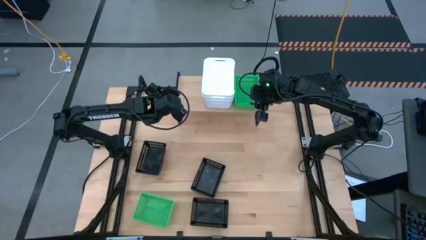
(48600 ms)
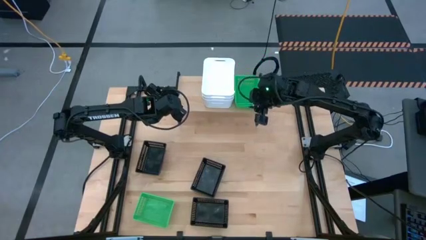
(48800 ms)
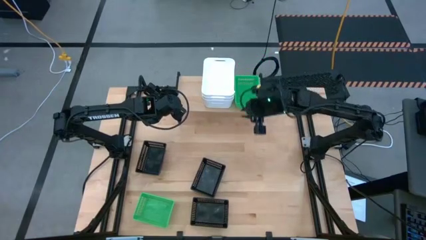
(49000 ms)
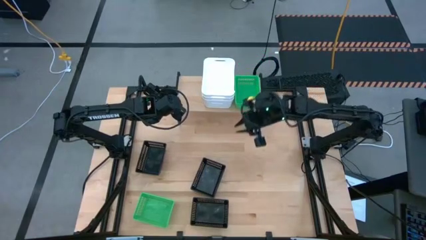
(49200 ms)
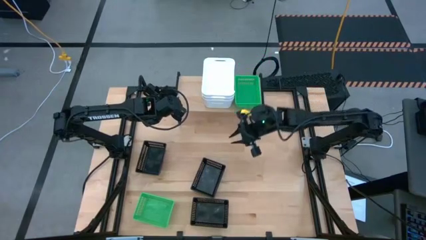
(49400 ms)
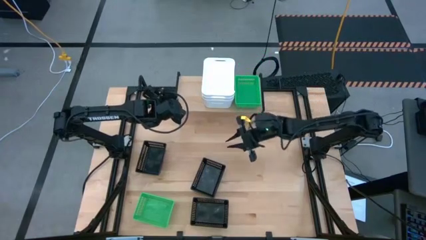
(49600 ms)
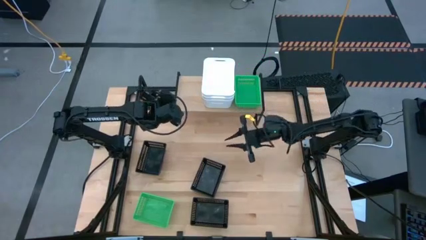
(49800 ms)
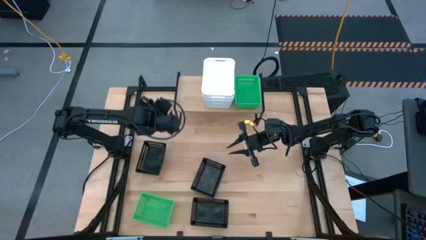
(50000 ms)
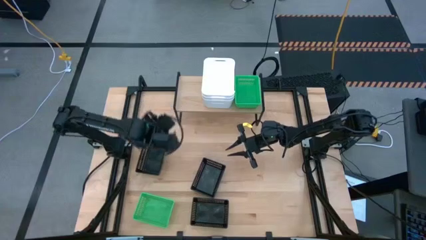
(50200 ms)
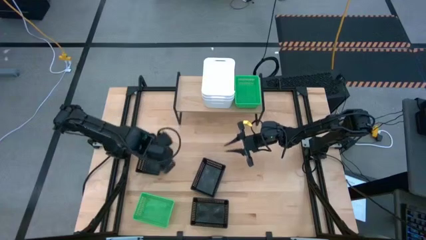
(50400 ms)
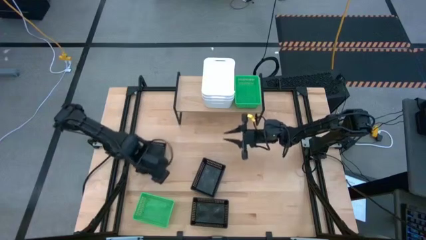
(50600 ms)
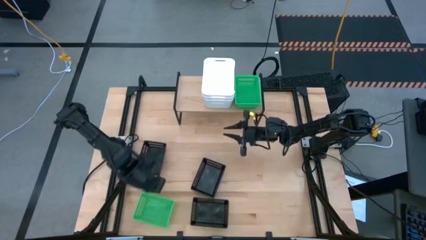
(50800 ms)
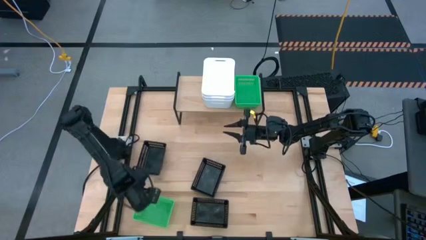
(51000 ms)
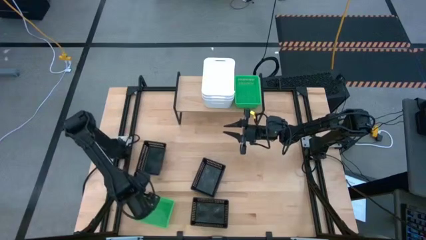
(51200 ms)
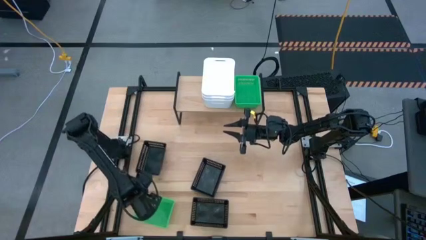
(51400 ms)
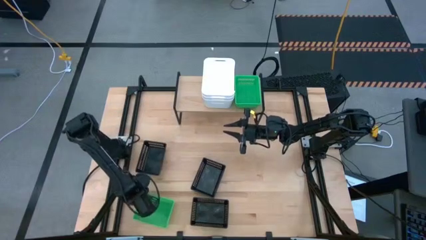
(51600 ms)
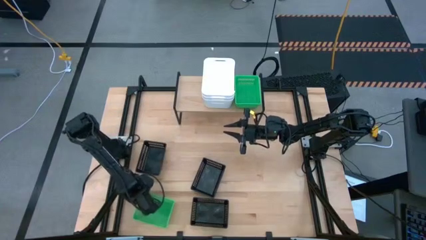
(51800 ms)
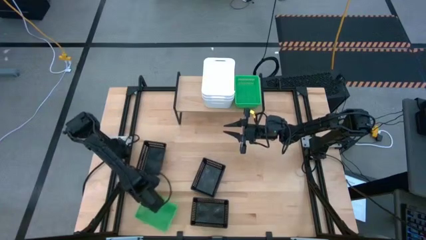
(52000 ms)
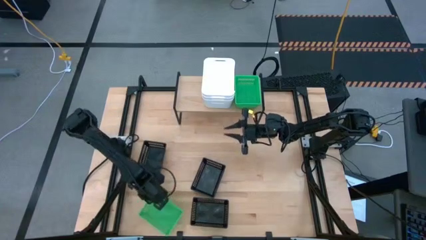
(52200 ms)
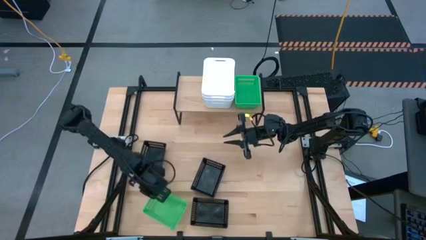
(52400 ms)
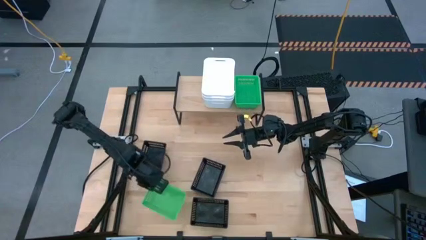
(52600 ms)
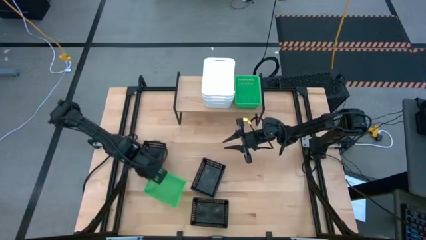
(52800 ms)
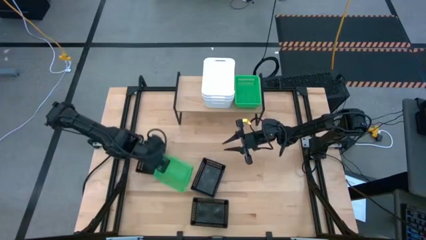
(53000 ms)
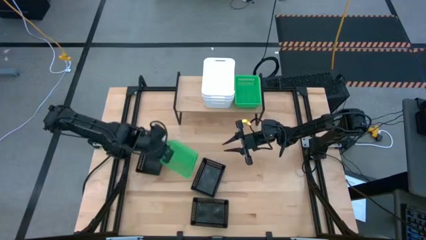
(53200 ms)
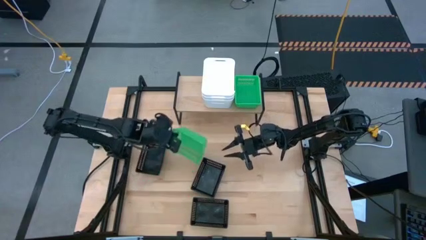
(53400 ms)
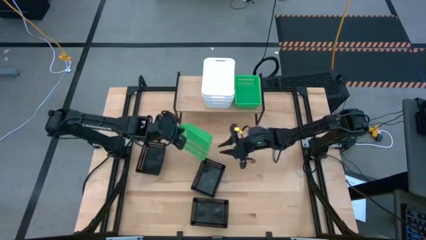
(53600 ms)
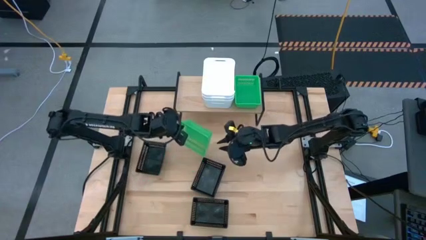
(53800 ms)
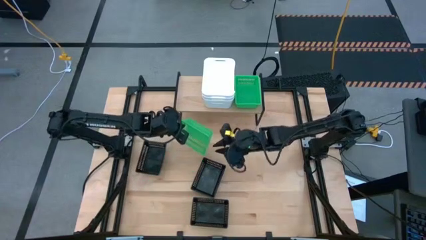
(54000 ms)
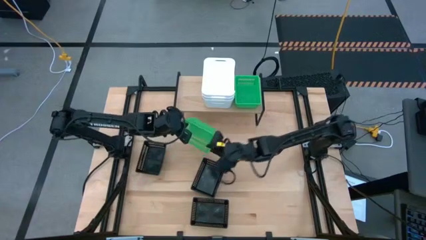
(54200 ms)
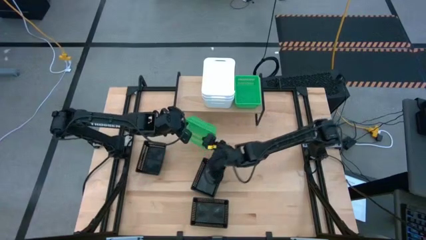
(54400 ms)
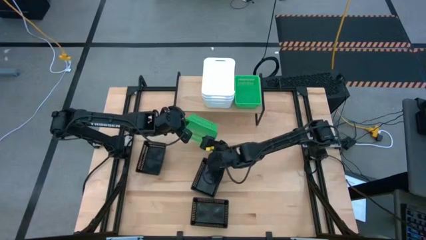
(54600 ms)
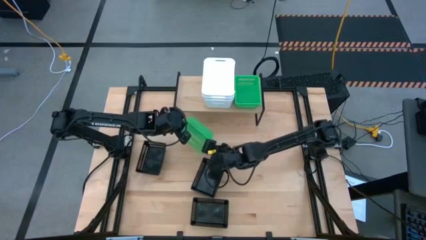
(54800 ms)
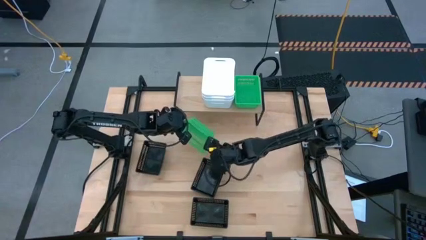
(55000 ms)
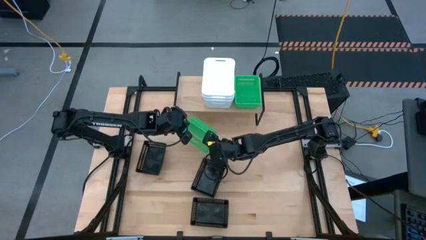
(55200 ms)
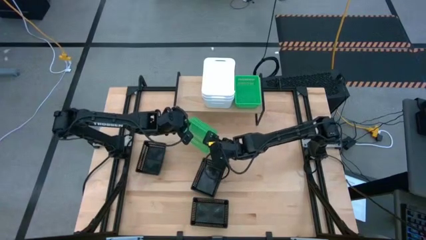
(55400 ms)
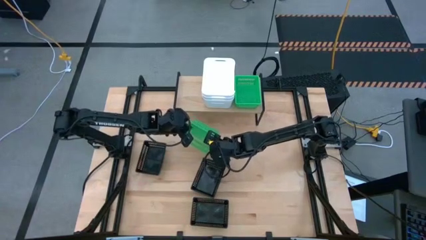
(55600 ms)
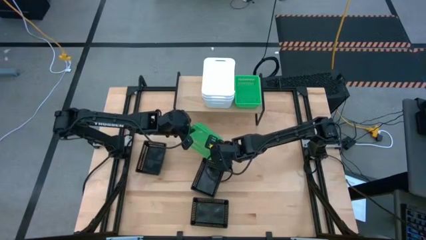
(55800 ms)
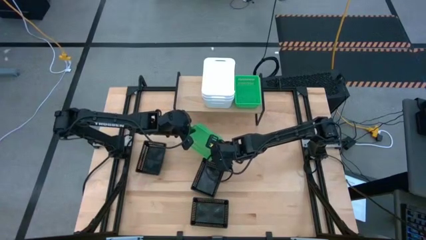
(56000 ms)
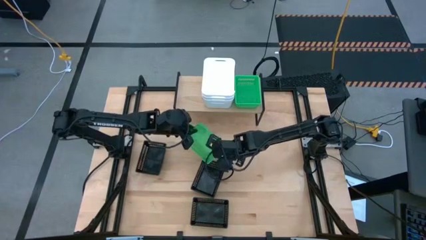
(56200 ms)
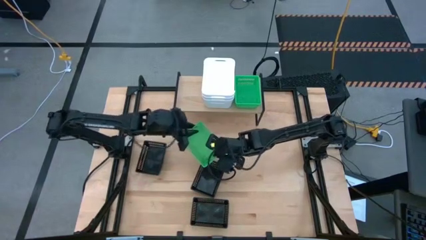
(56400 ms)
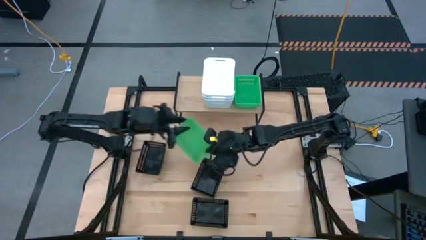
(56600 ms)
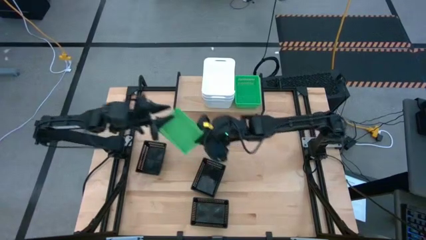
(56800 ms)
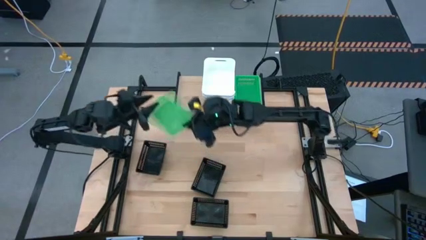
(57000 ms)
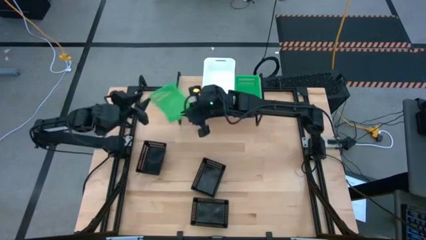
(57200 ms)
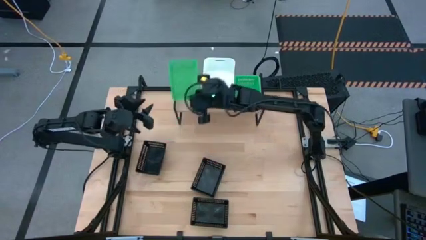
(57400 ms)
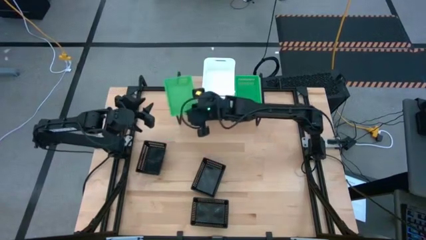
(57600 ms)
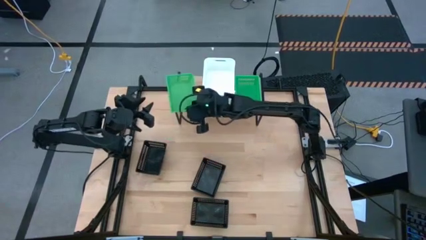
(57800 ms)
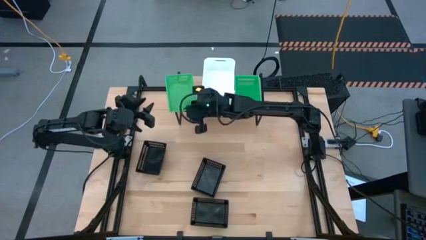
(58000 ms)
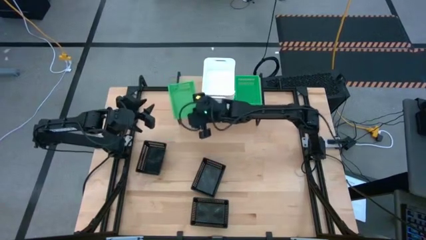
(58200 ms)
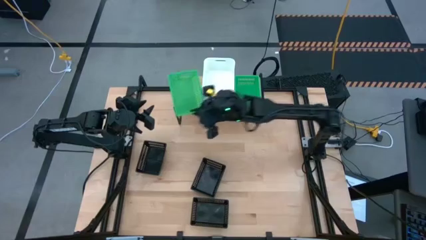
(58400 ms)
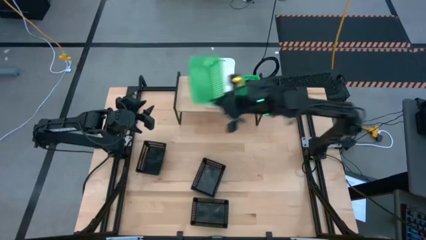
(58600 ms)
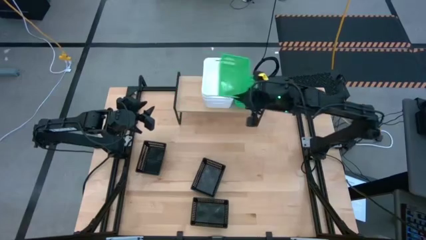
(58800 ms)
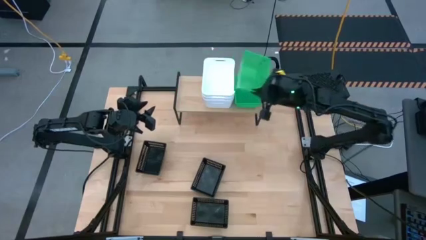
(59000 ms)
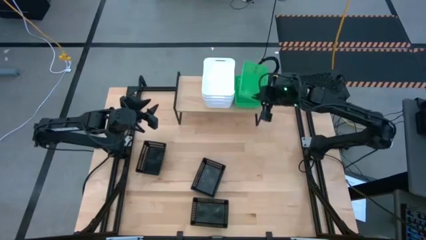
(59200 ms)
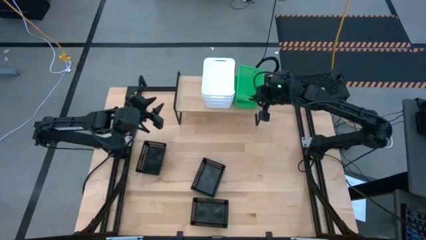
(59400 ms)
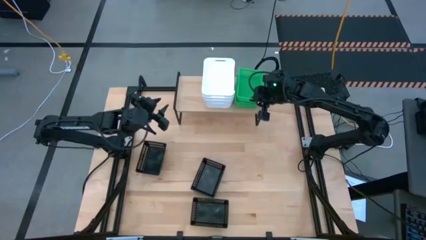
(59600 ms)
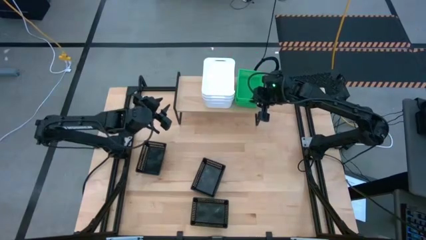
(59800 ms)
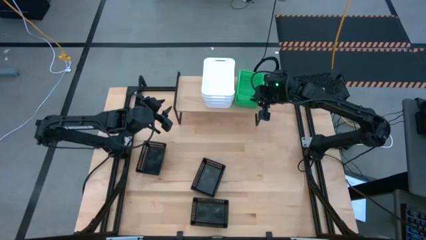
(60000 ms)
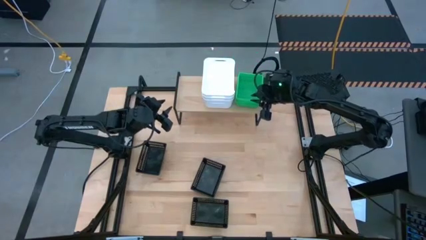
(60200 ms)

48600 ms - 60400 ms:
Task: Stack baskets on shelf by color
Stack the green bin on top of the other green bins on the shelf

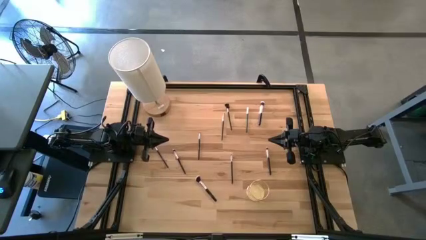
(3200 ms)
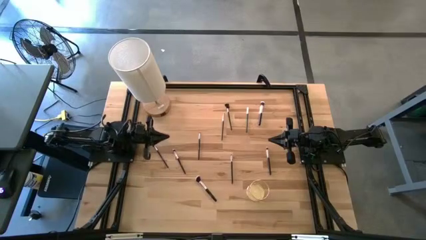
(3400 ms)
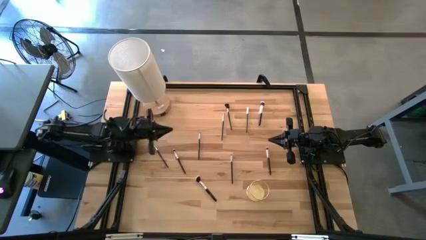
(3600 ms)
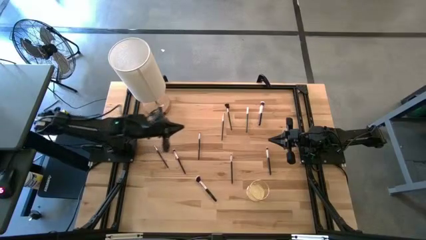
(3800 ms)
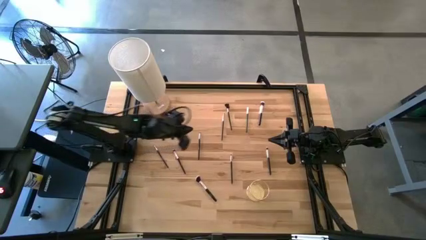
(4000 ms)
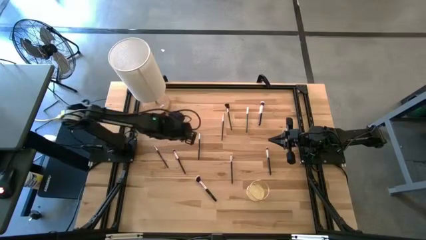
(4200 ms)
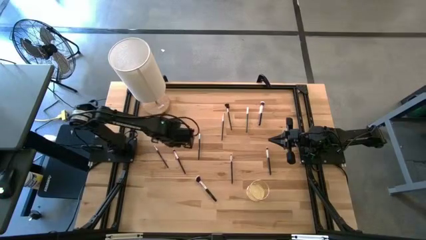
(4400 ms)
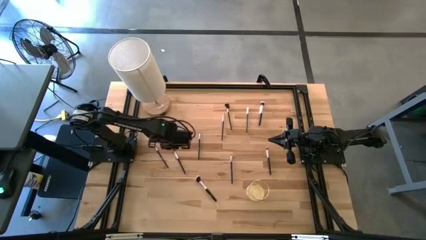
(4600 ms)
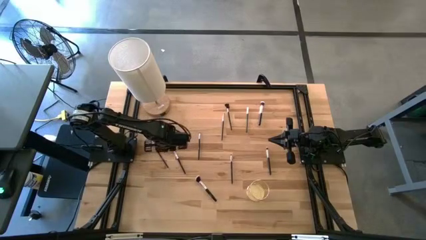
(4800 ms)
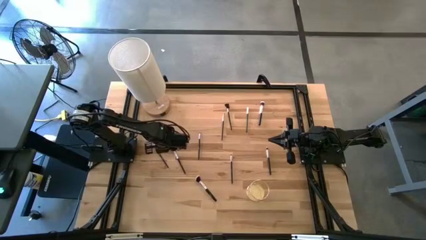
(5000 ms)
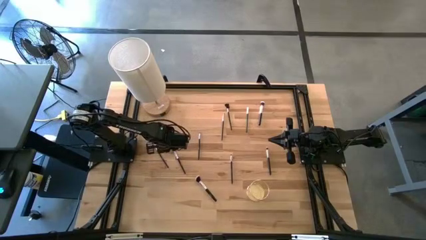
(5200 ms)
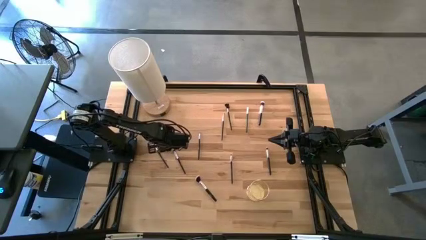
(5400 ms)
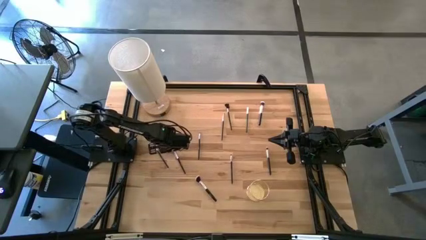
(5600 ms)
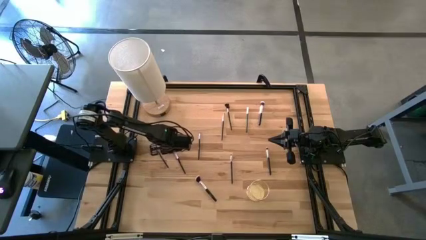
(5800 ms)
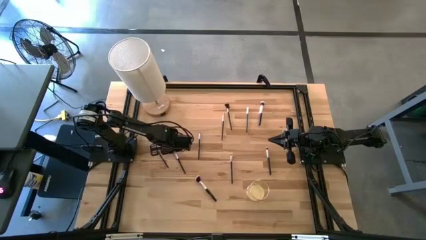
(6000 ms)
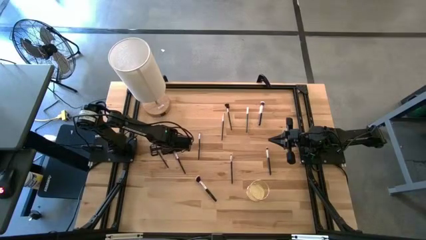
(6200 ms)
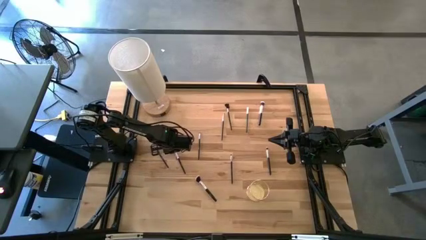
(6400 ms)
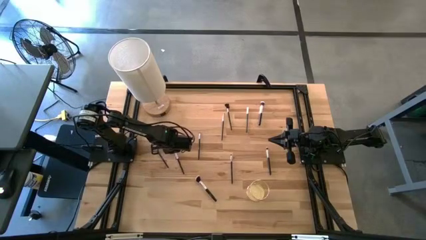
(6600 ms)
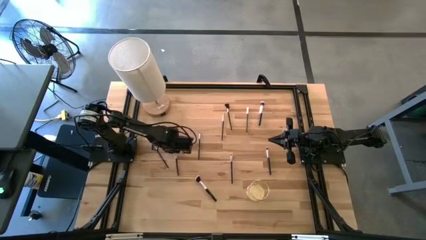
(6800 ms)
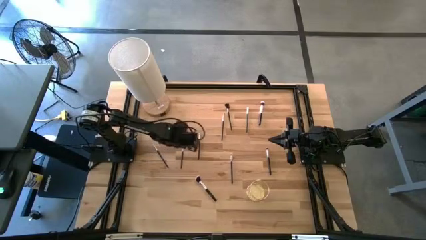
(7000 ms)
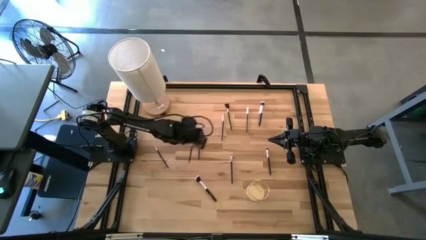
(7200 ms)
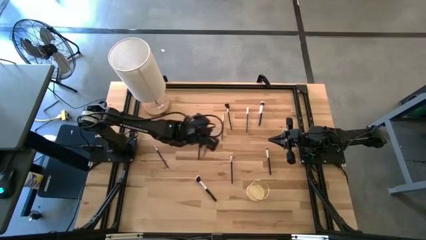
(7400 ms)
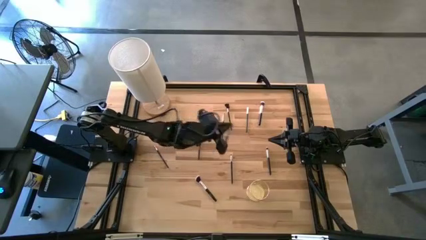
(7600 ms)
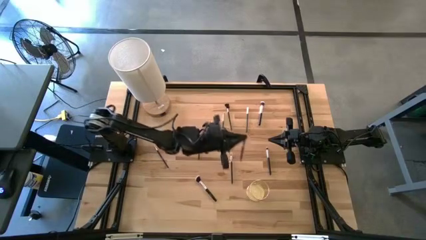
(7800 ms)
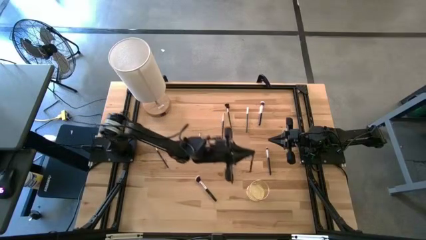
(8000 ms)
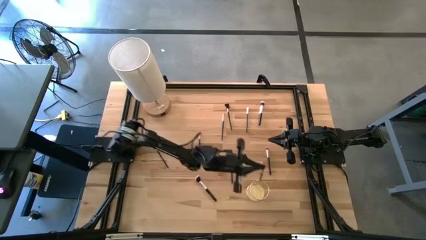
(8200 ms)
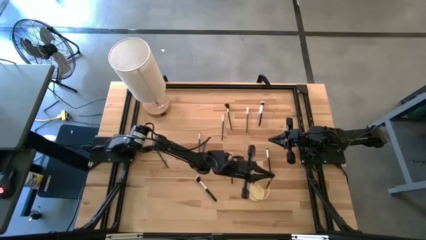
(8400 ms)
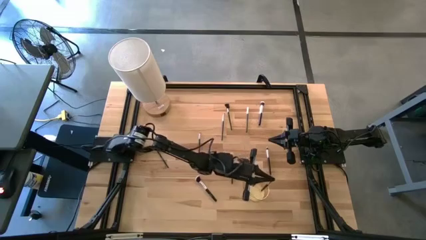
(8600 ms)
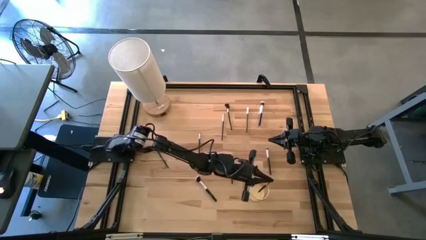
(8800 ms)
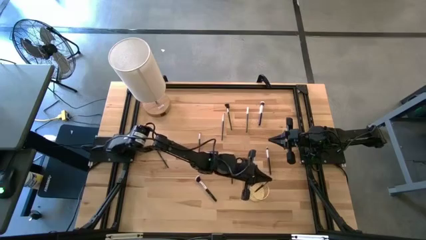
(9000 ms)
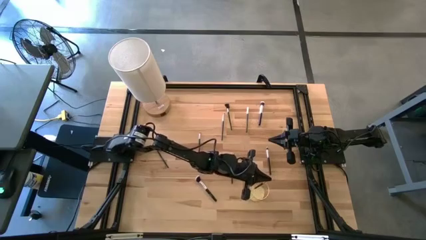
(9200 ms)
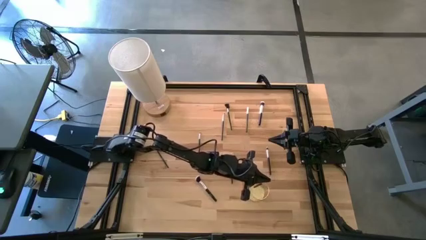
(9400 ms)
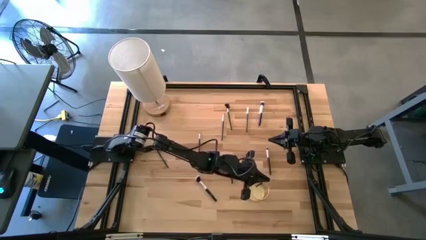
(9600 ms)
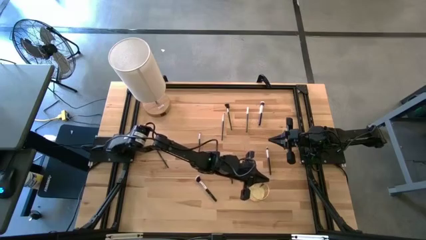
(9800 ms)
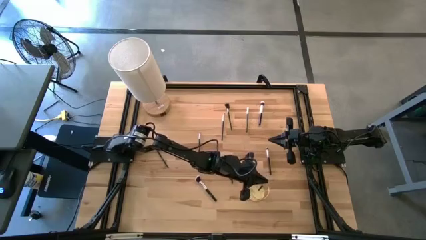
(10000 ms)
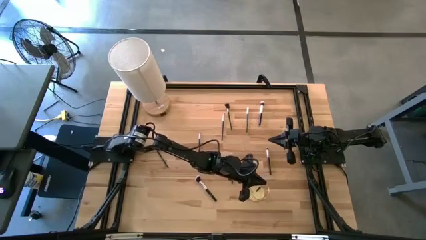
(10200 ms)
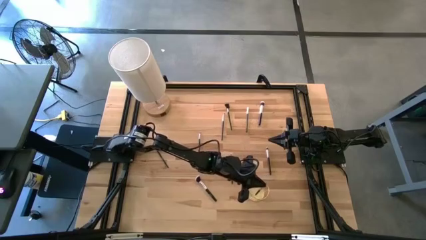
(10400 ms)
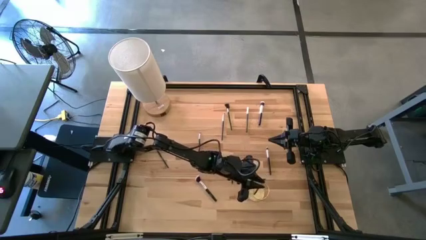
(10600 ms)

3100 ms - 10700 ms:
Task: Pick & Place Makeup Brushes
Put the eyeshadow brush into the makeup holder
